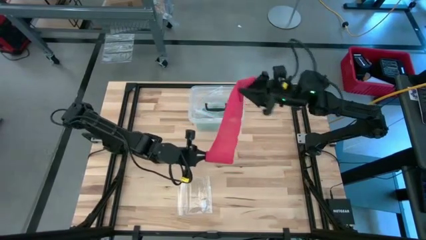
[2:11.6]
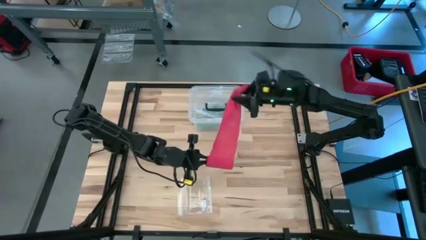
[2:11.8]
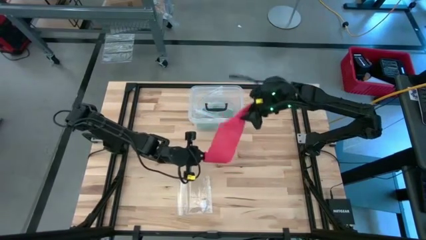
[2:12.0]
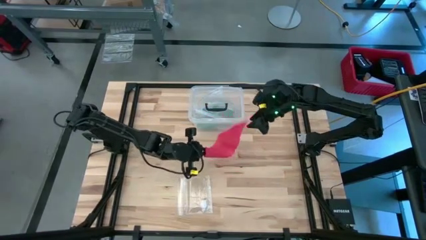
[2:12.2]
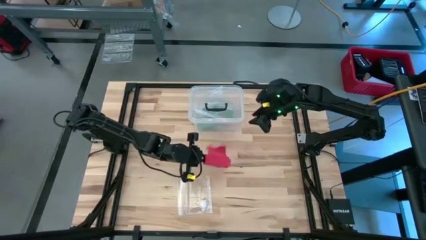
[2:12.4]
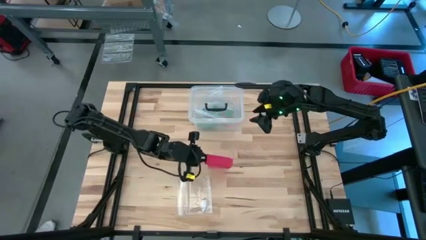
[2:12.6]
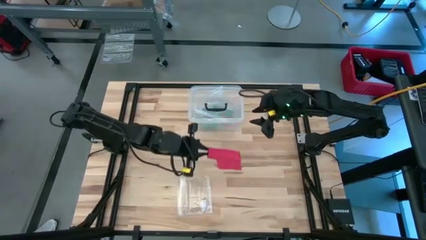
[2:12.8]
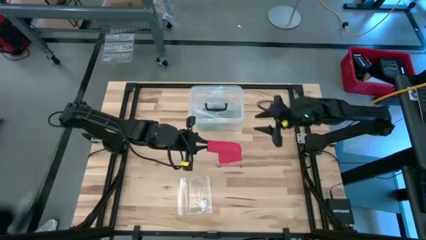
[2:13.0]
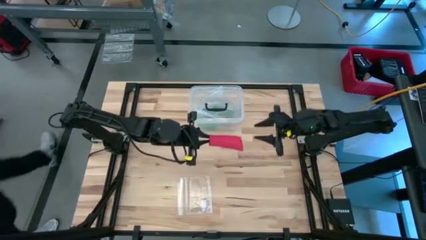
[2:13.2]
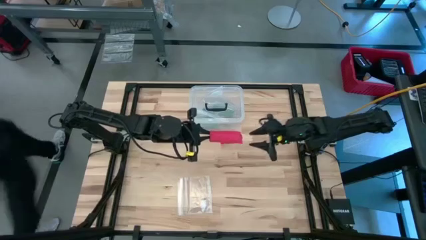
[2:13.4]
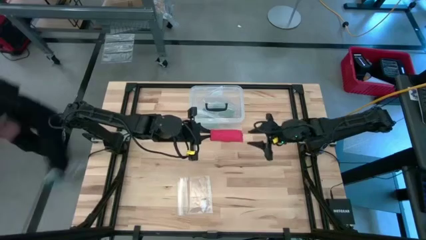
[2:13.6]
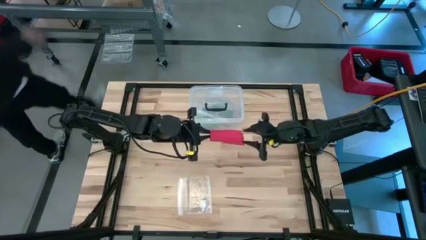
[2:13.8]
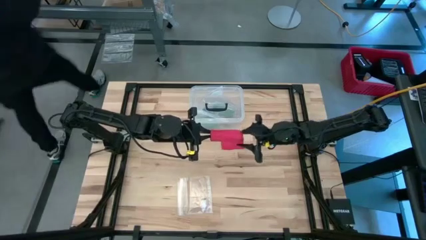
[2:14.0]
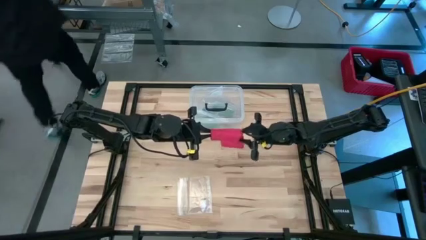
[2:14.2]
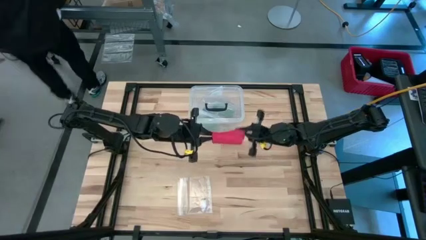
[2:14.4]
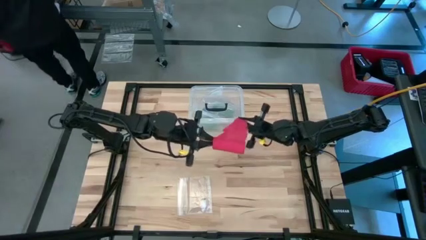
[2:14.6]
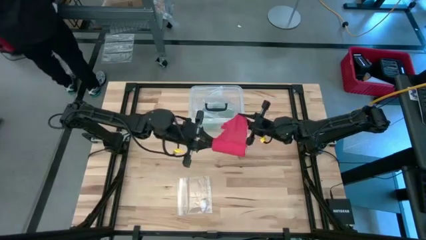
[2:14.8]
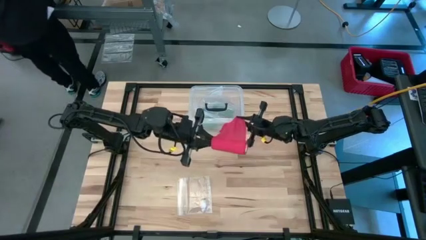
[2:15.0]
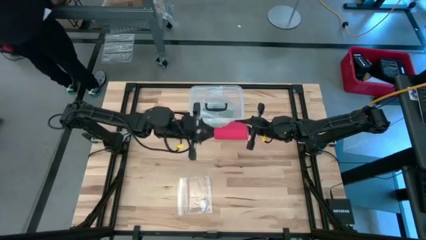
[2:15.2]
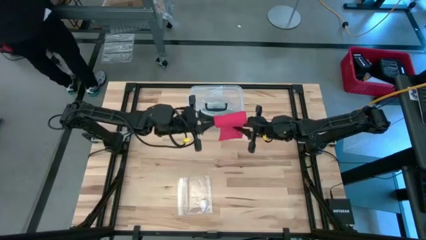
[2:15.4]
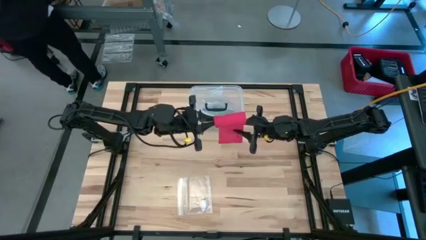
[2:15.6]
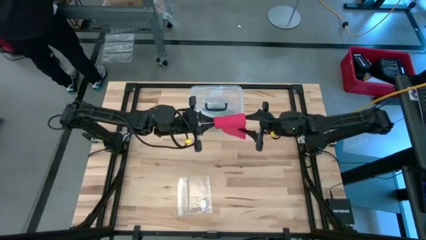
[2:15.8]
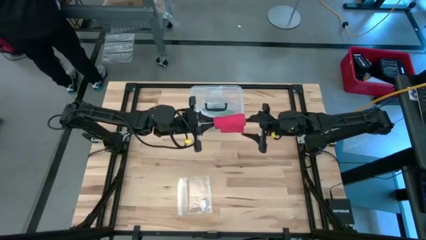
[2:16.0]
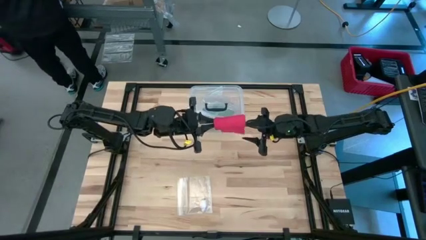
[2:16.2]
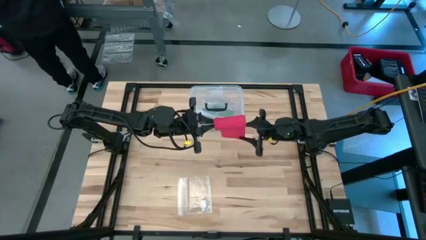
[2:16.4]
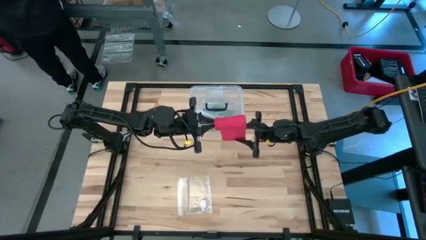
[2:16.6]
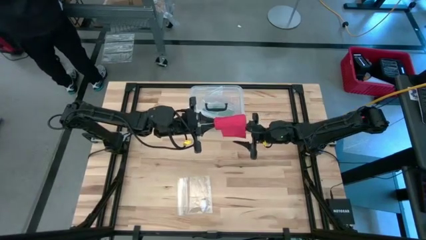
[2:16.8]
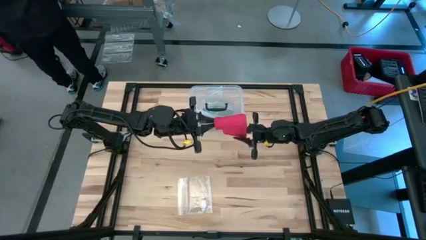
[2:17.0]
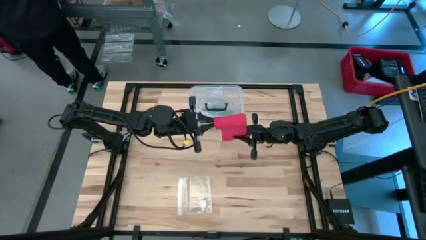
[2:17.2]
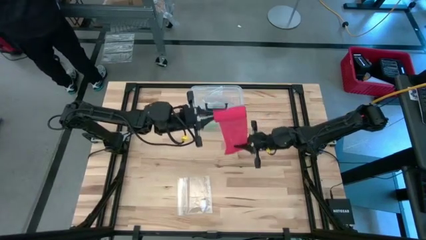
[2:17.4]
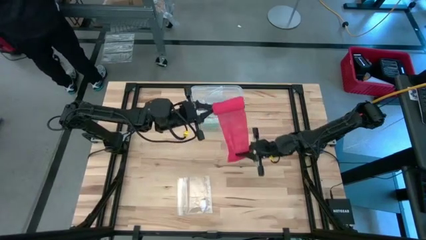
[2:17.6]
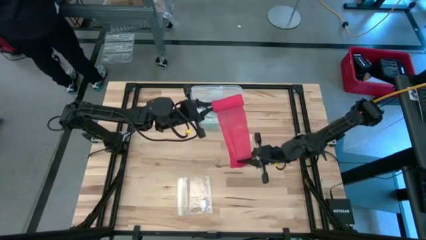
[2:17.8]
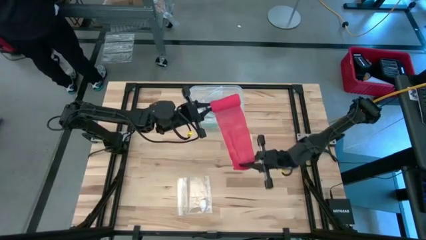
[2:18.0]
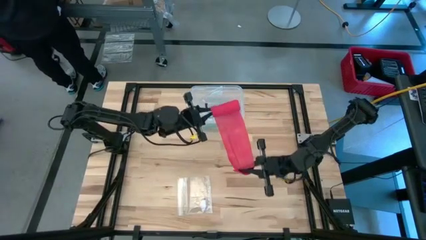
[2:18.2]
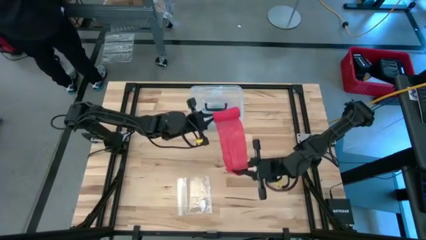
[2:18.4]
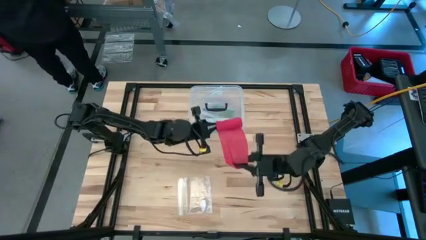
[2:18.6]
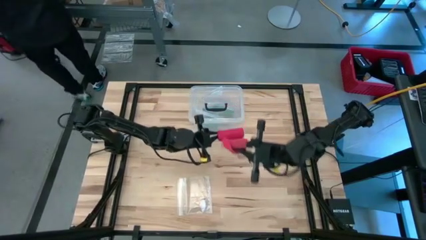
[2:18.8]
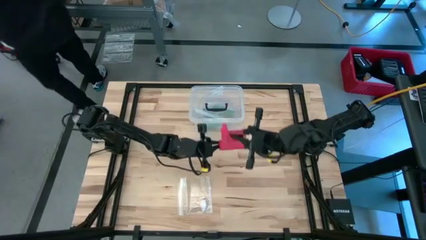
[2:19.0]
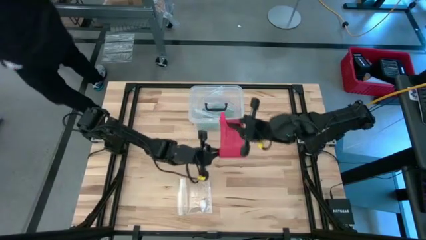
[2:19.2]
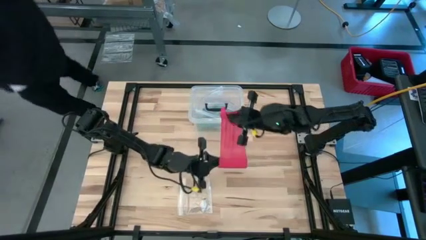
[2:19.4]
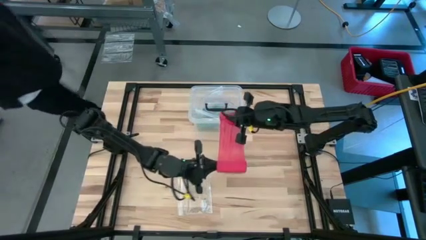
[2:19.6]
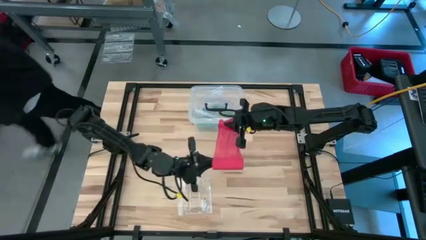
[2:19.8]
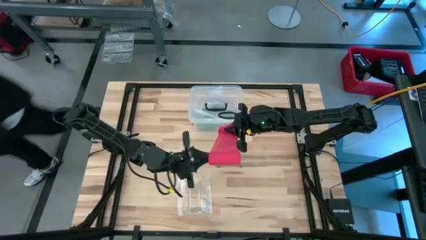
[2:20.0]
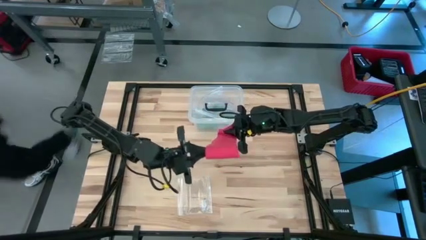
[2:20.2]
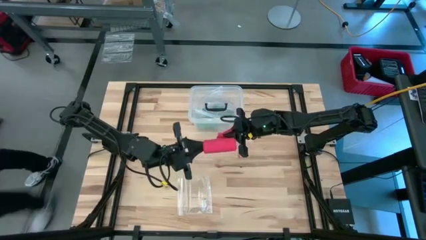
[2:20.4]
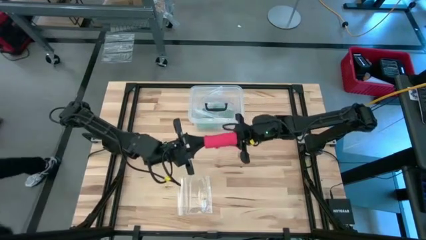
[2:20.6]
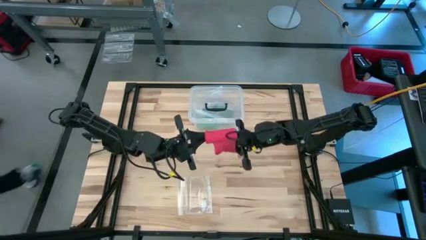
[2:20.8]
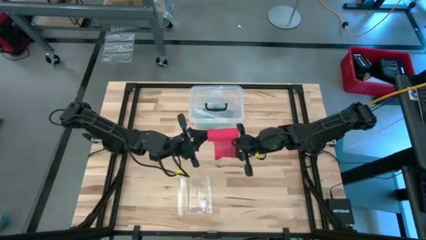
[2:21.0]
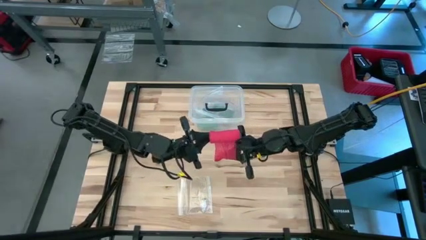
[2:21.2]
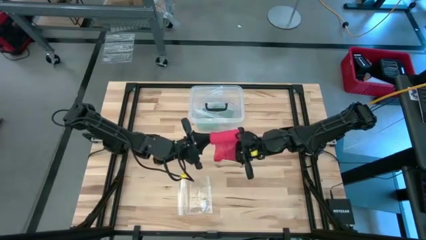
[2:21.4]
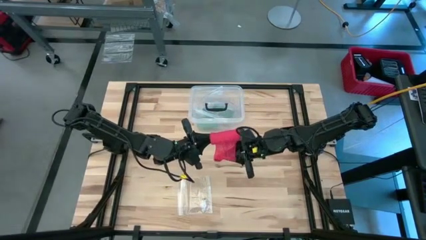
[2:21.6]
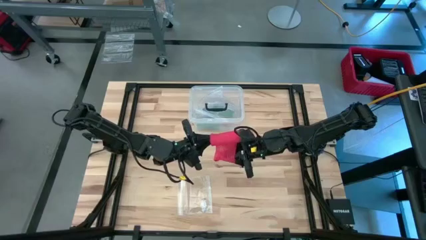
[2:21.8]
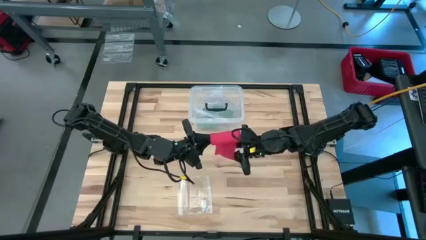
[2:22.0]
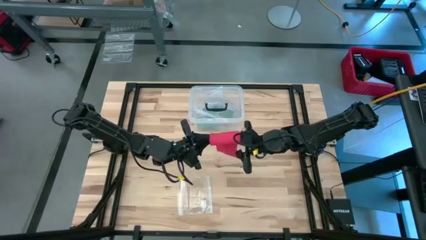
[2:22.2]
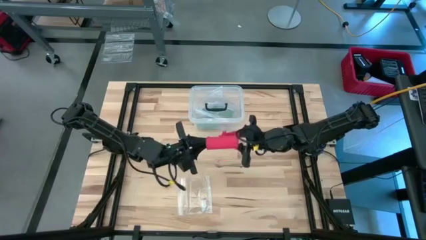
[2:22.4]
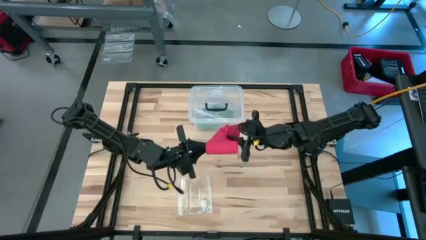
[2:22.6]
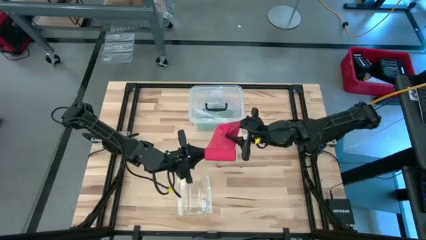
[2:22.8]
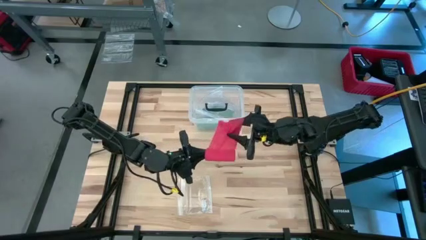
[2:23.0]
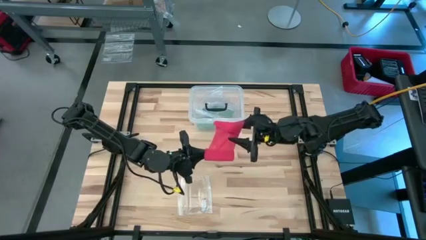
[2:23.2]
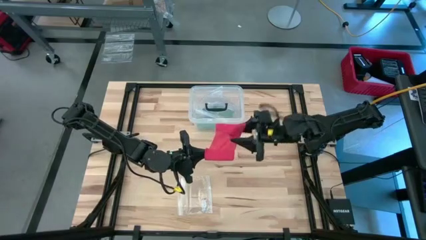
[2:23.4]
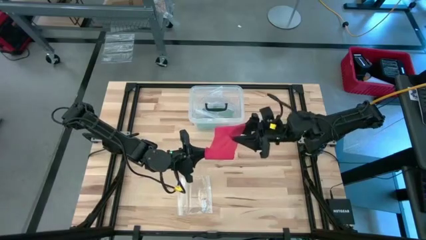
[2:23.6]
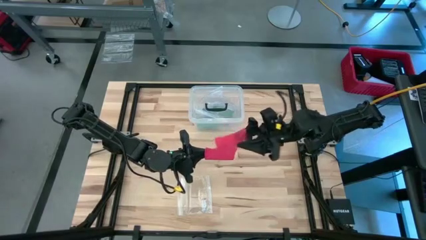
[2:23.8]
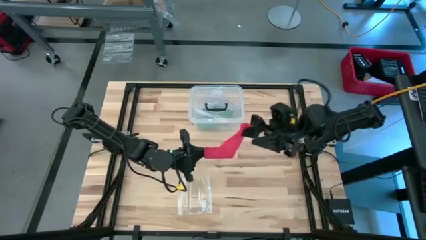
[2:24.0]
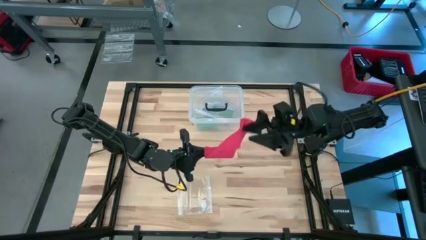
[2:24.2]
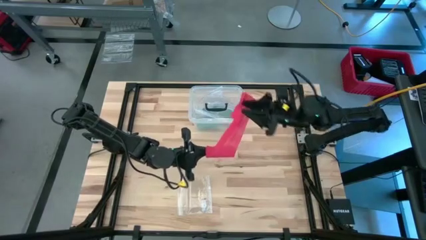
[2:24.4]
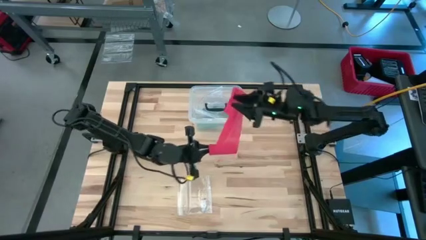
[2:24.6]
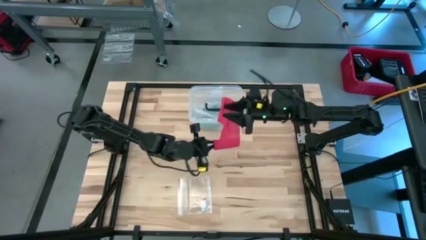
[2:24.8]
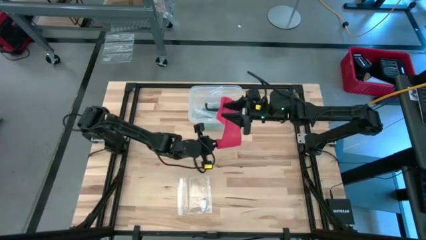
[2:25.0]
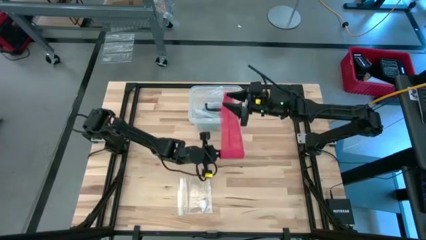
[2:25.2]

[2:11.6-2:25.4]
Task: Roll bandage
Roll the red bandage

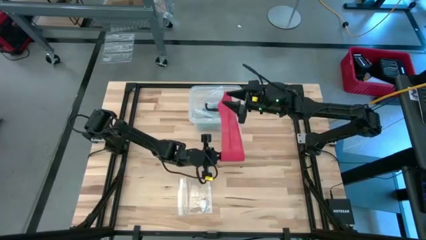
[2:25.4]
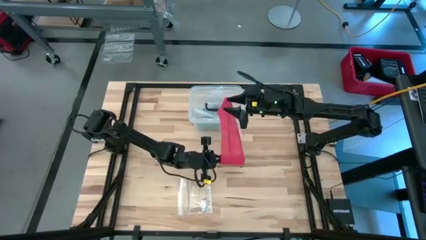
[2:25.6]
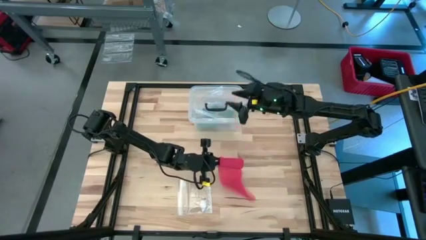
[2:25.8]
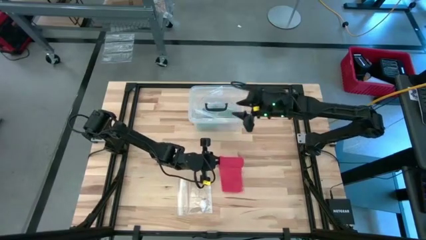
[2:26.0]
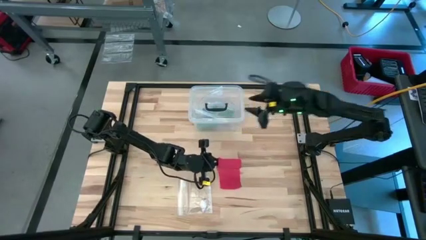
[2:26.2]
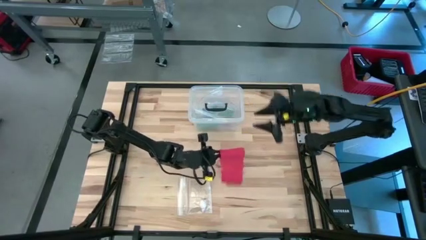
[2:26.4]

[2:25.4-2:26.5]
Roll the red bandage

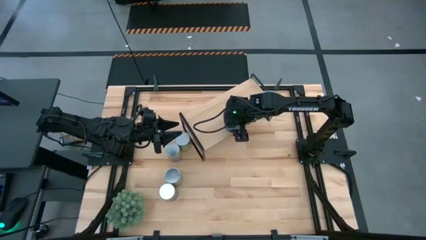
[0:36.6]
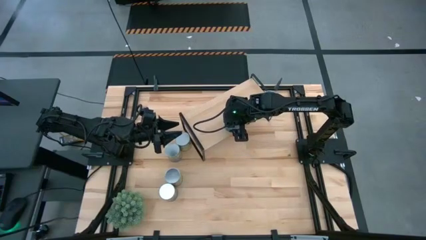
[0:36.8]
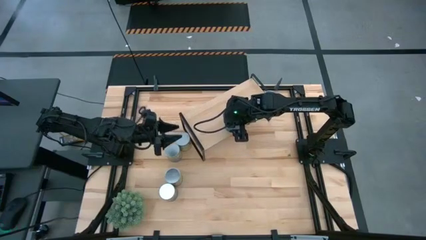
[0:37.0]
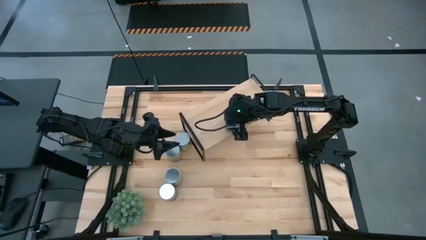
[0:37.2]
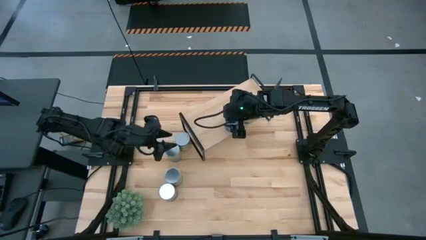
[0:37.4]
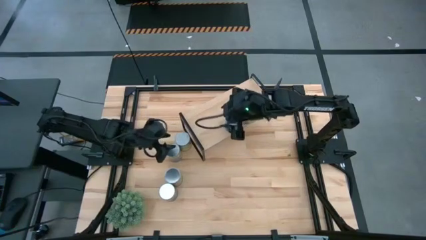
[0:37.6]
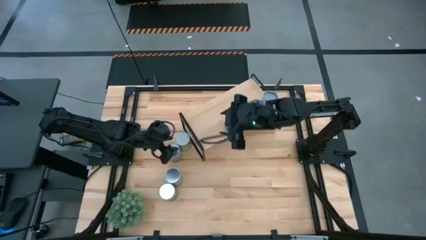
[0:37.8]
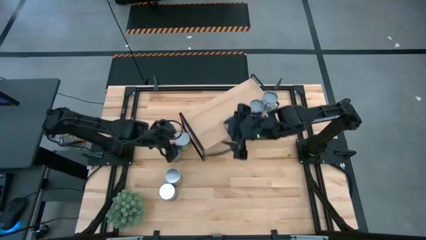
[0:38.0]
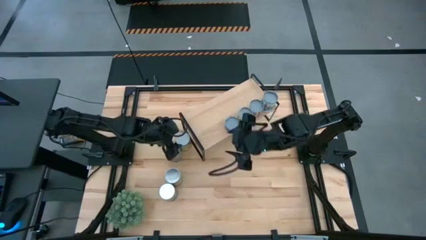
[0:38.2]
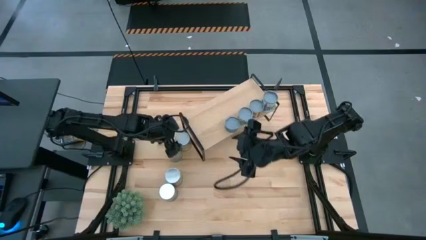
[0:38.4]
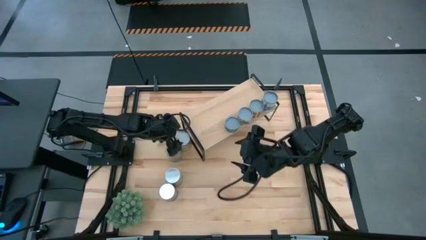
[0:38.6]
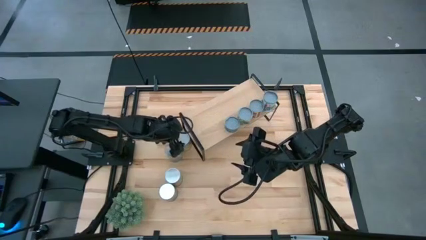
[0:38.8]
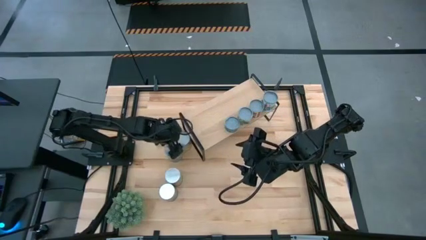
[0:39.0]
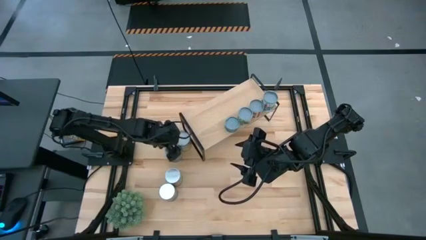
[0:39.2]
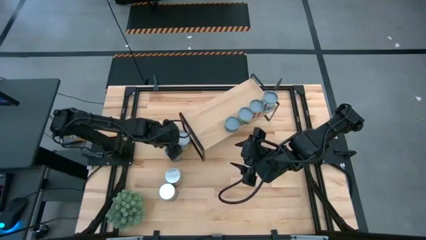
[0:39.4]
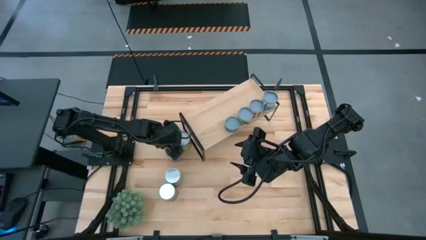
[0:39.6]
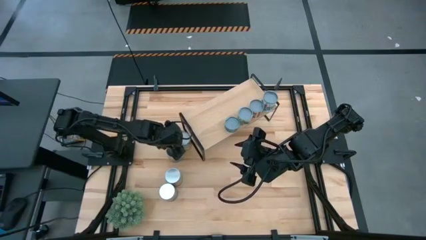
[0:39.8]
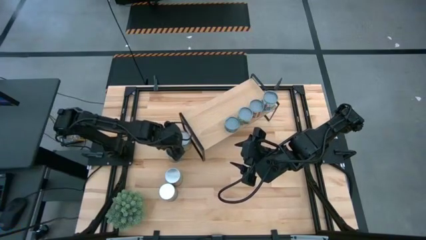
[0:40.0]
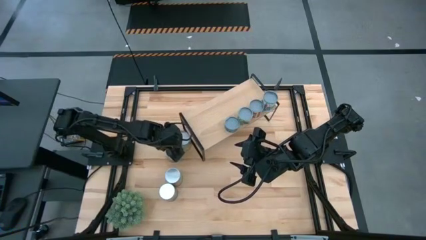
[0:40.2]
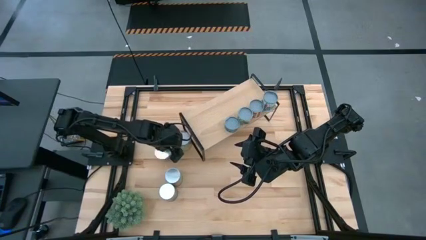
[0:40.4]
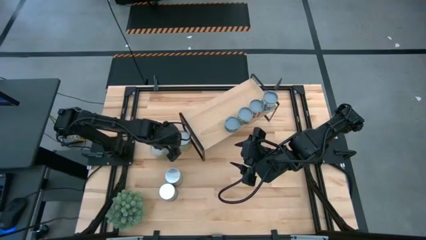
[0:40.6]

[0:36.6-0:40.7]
Task: Pick and place cans onto a shelf
Put the canned peaches on the shelf
